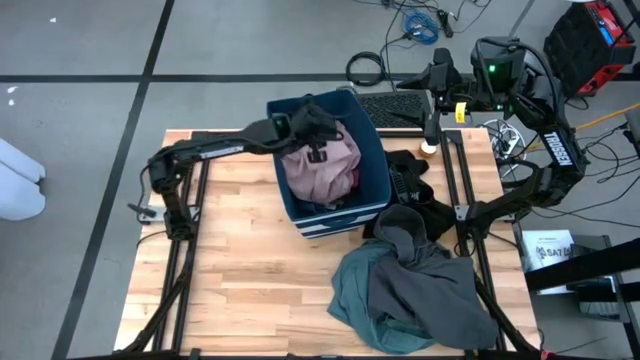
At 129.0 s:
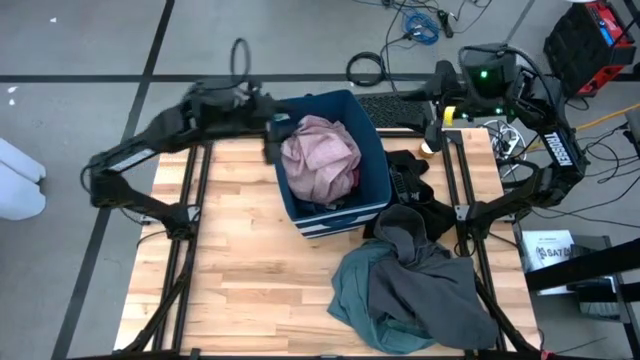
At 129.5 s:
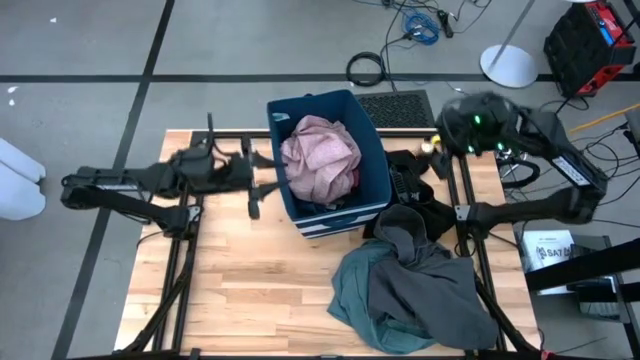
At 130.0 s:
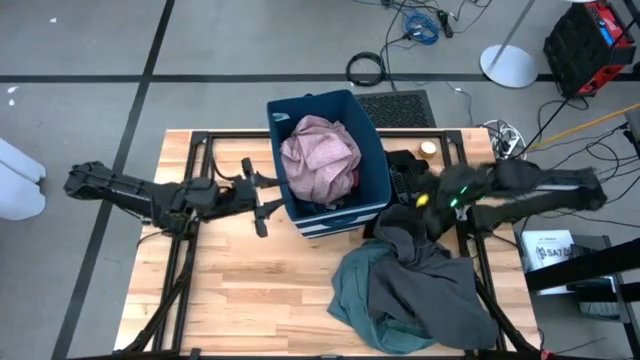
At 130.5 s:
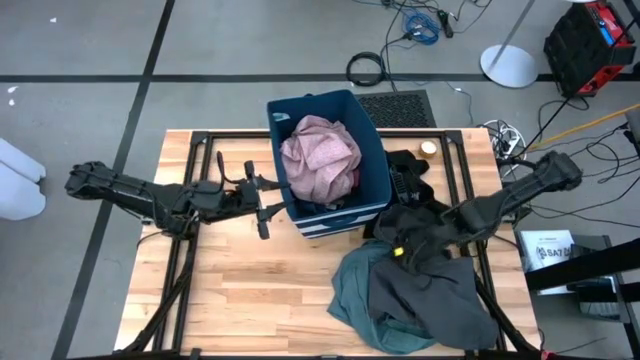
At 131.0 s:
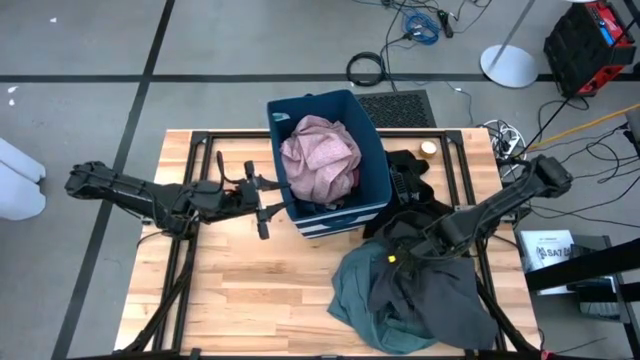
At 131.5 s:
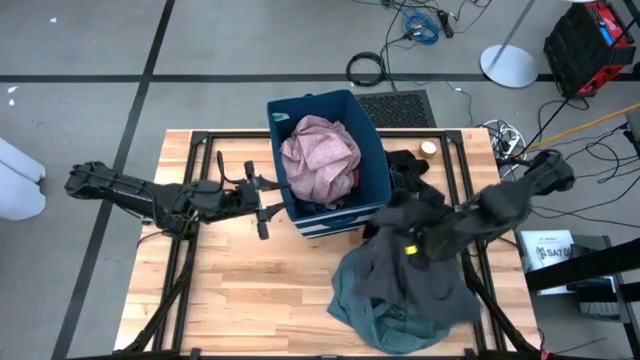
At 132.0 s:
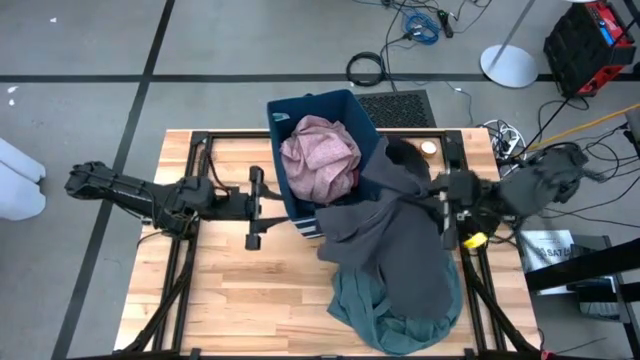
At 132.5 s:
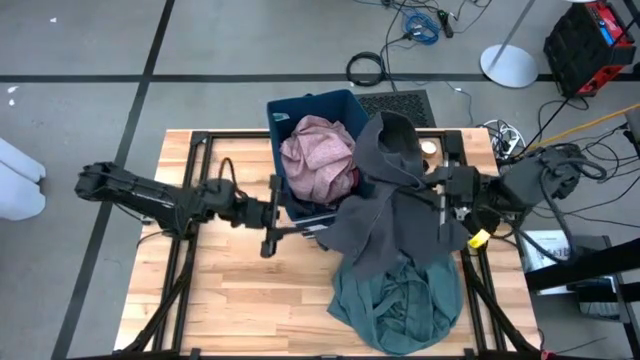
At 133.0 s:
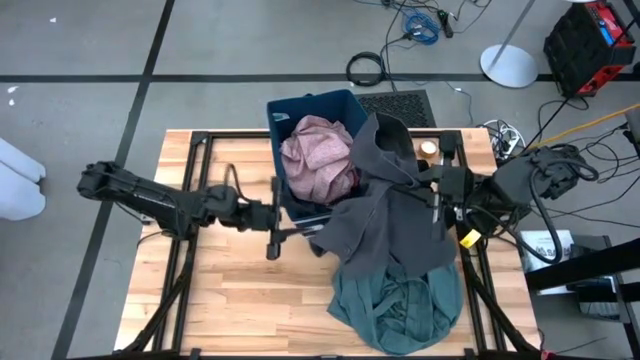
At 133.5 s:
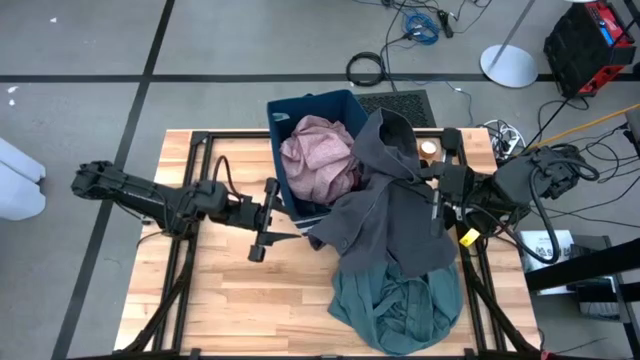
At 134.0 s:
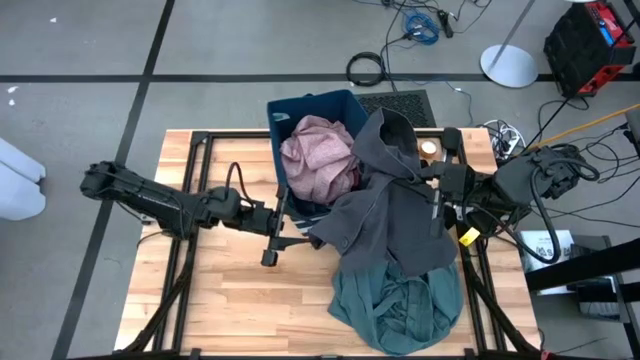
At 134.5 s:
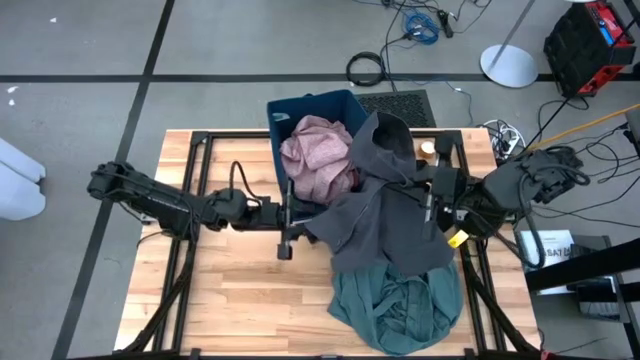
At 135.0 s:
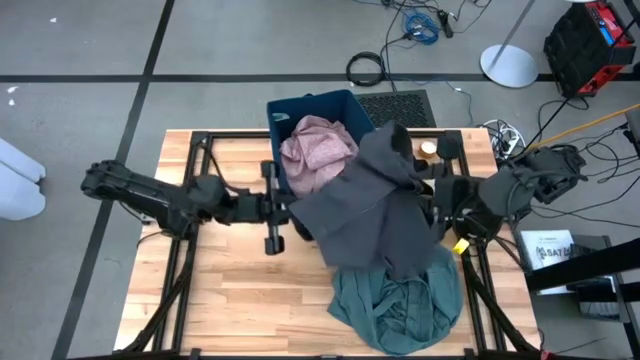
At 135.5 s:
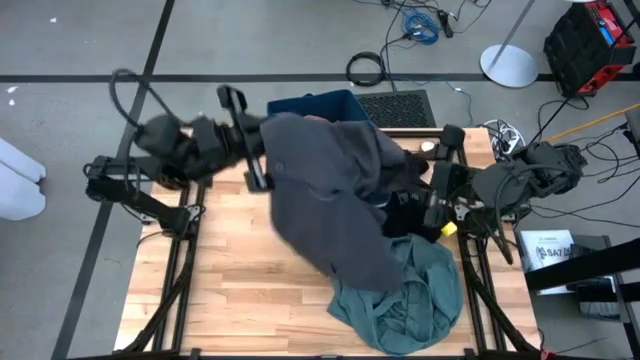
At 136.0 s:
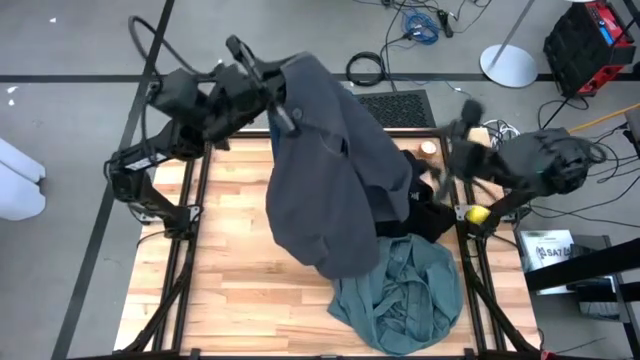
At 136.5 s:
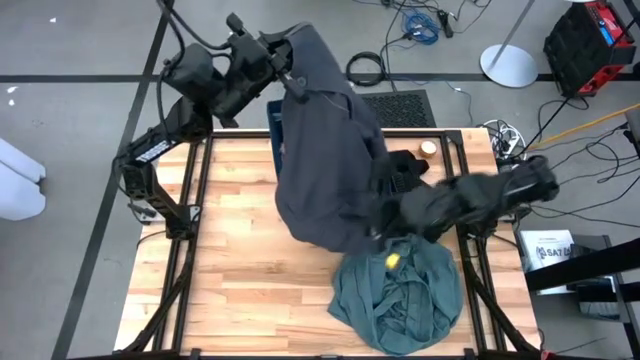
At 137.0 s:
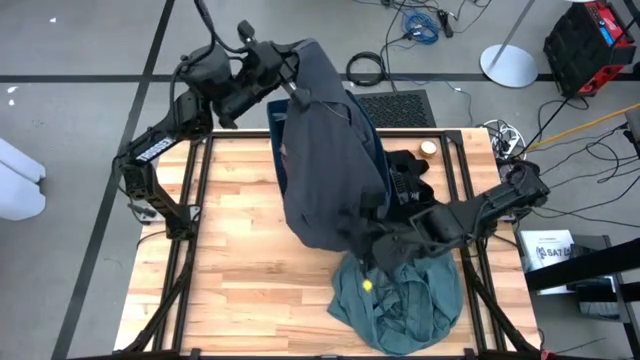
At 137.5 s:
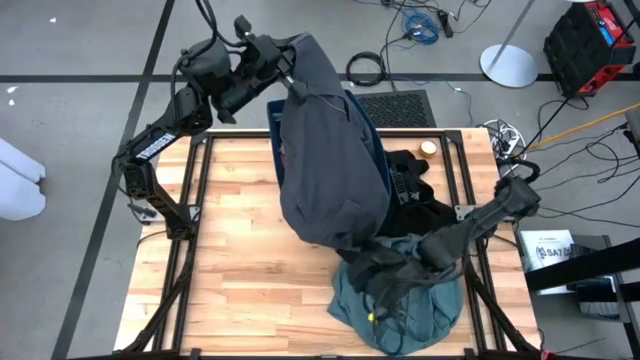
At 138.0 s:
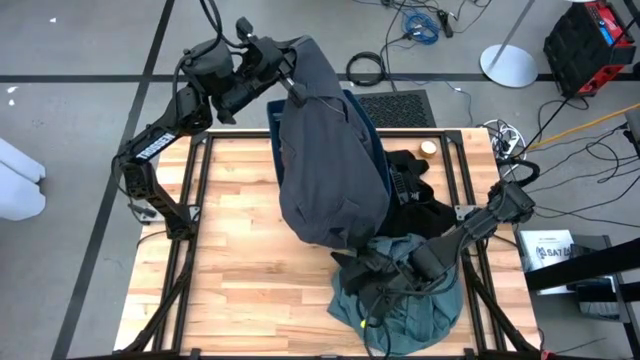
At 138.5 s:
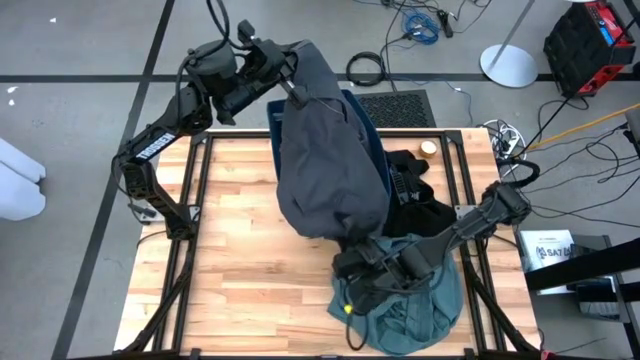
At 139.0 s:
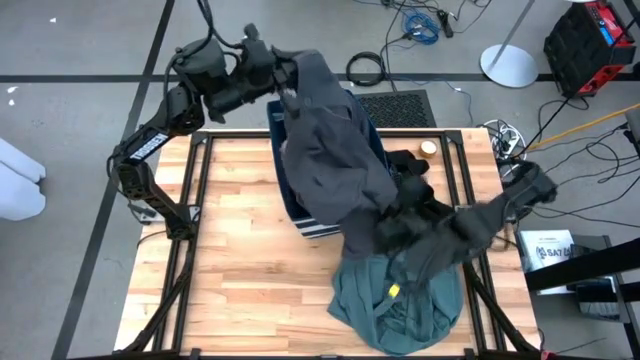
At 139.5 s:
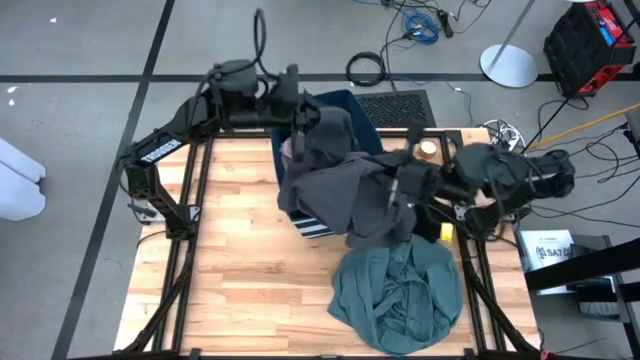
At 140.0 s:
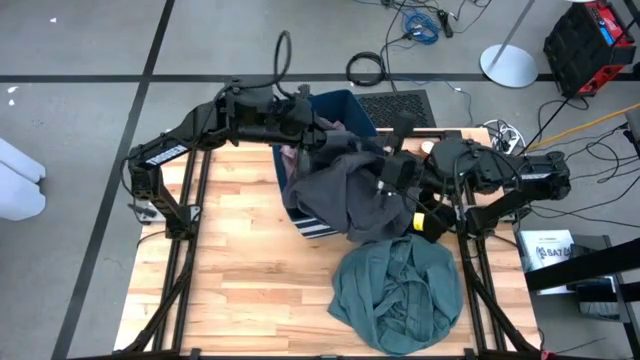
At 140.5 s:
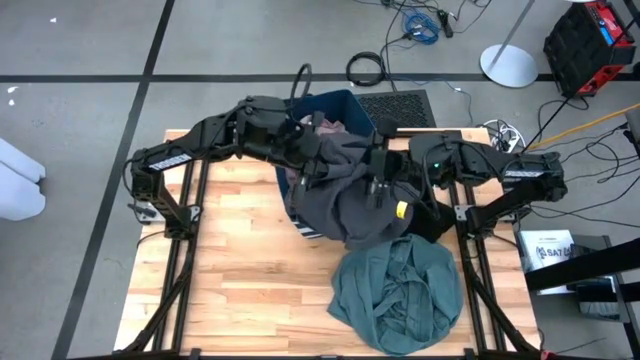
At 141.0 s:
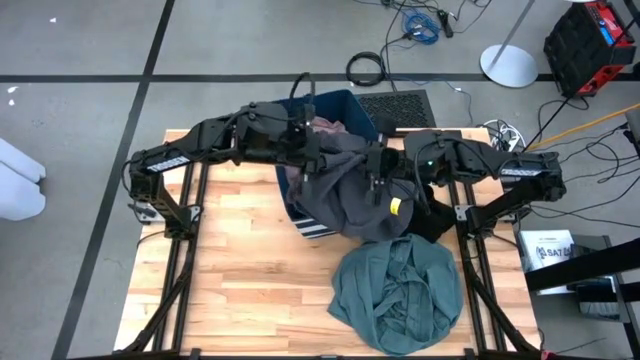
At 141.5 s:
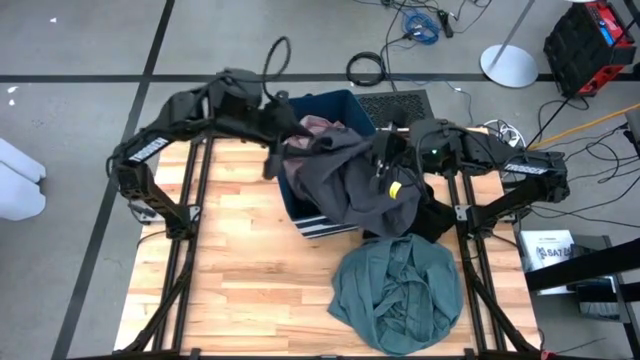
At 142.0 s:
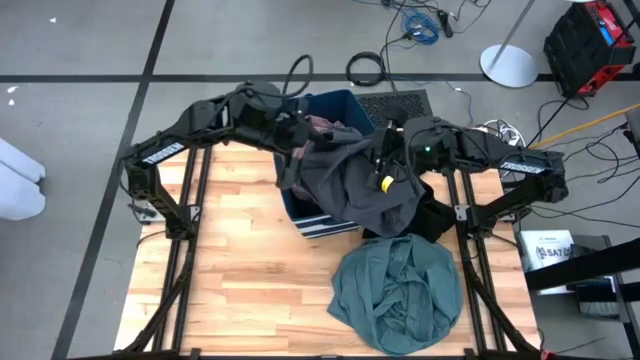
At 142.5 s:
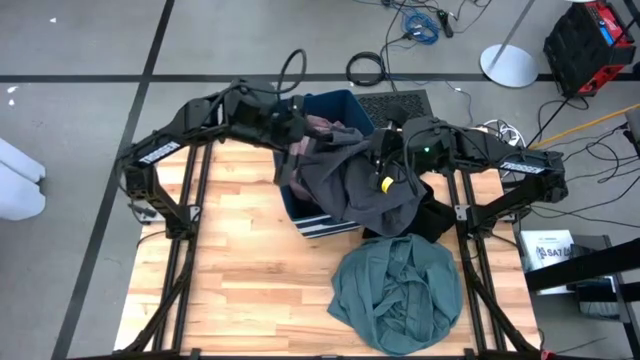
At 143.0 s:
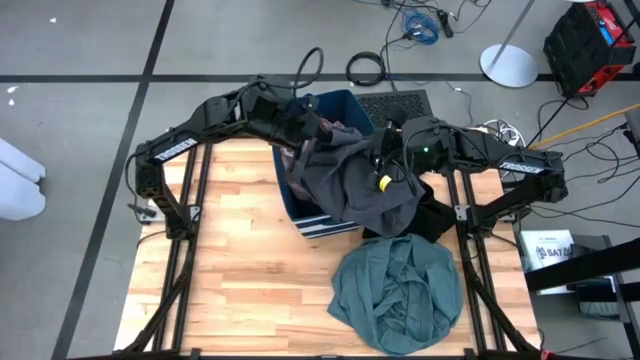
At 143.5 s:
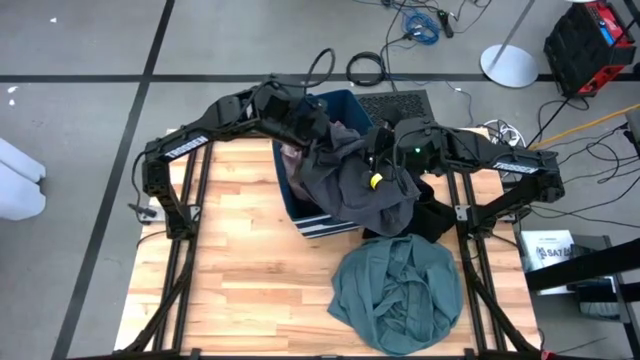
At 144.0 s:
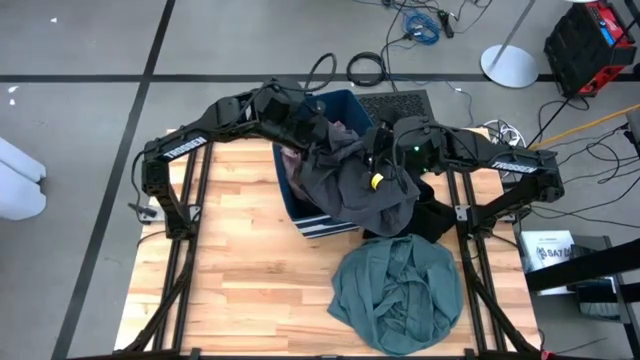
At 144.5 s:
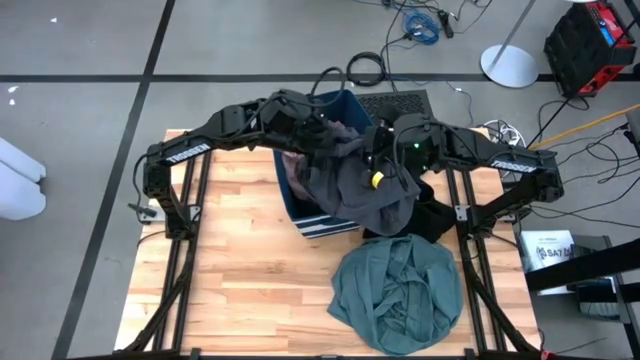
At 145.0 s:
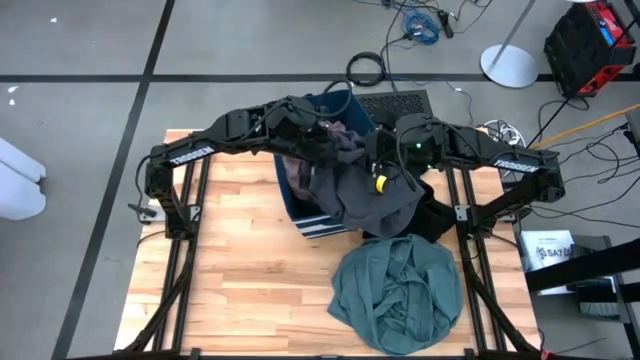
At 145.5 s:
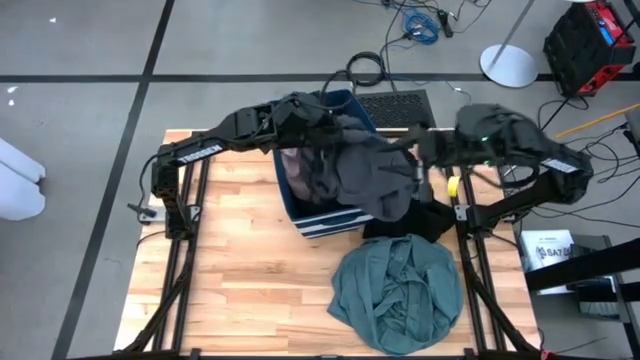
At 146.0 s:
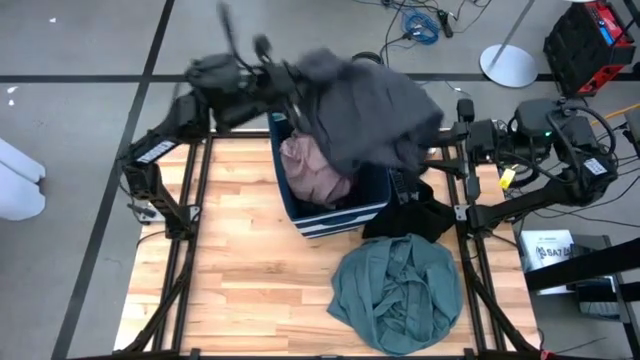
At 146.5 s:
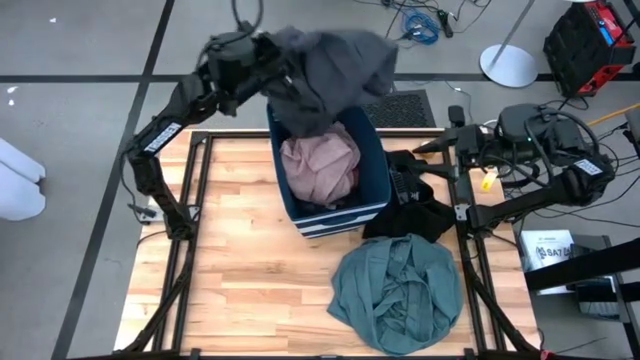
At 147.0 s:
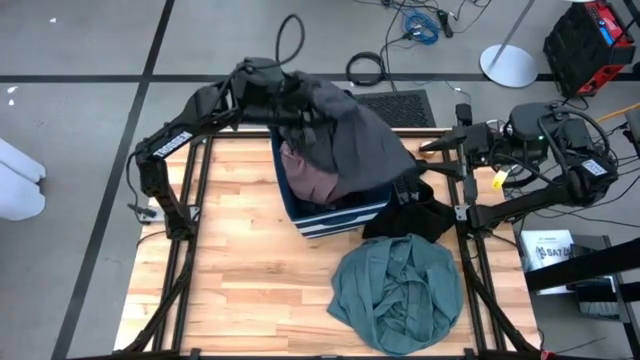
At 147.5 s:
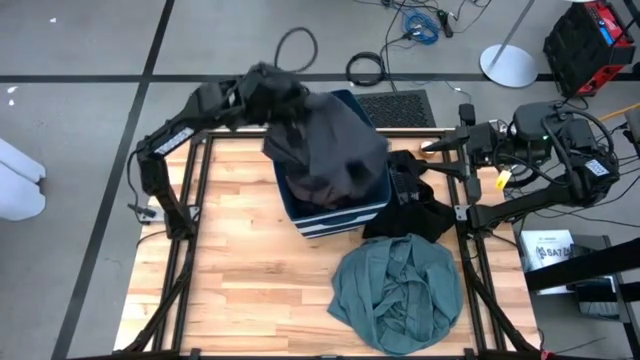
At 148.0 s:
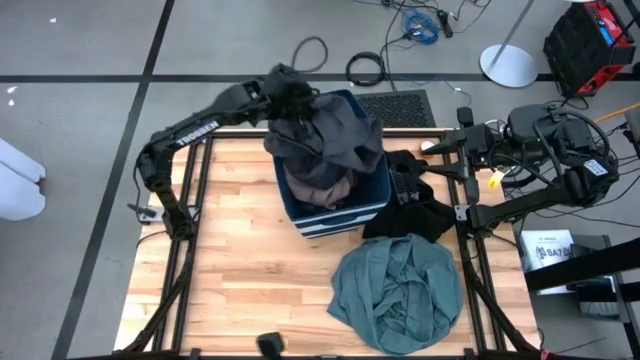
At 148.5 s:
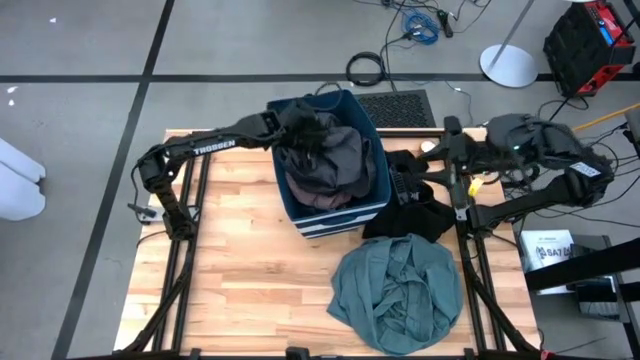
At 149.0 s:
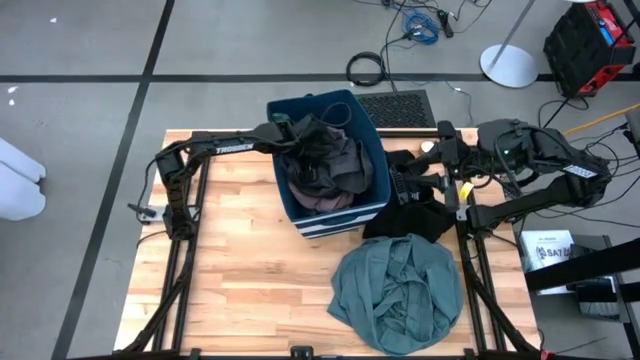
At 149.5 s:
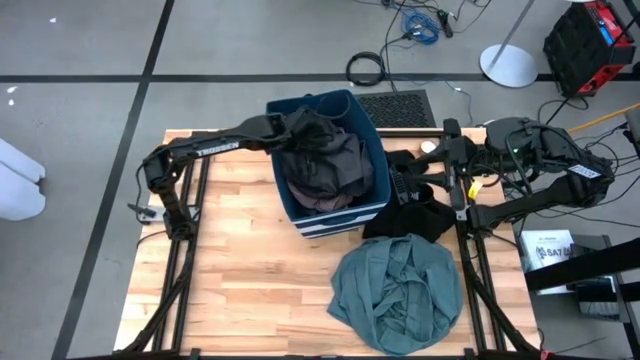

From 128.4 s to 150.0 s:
Task: Sort clothes
Put the gray cargo shorts into the blue laundry organizer
